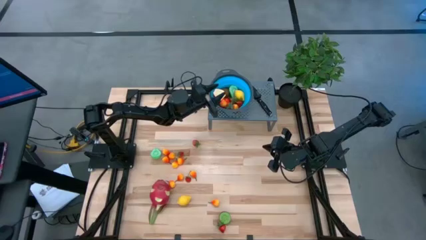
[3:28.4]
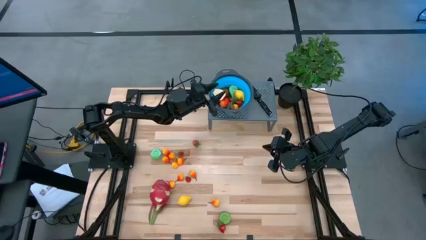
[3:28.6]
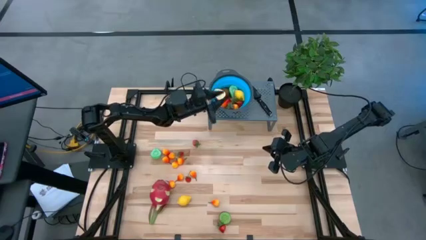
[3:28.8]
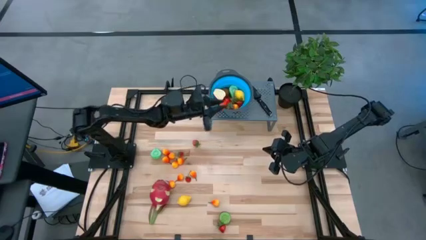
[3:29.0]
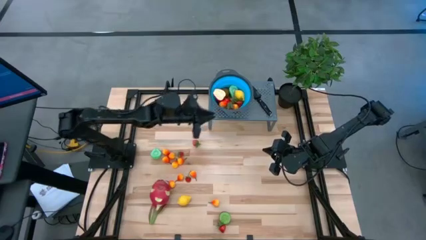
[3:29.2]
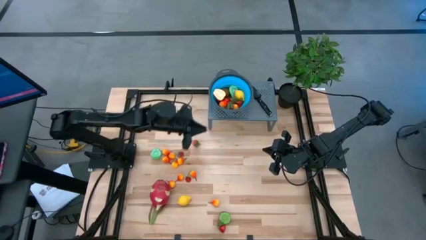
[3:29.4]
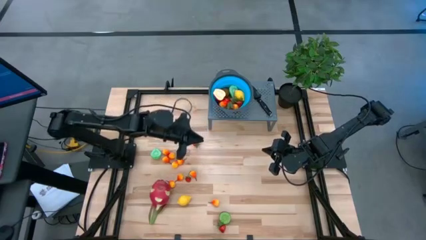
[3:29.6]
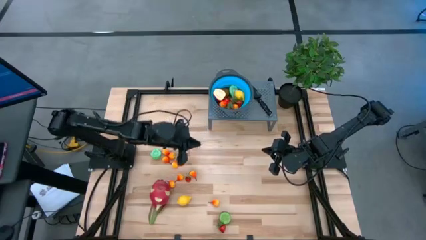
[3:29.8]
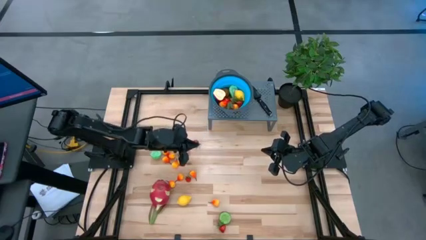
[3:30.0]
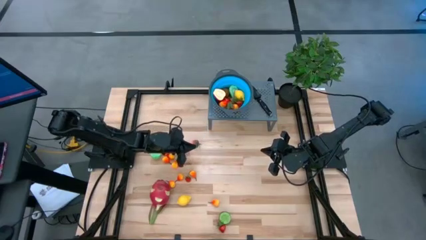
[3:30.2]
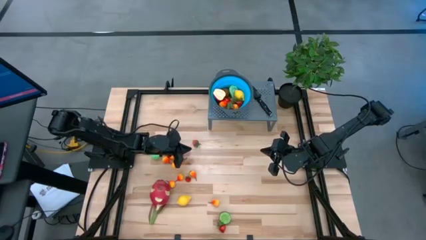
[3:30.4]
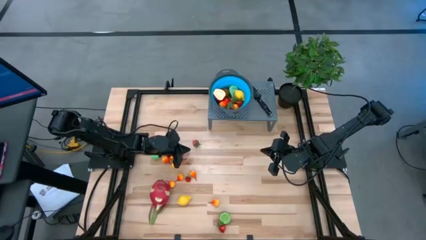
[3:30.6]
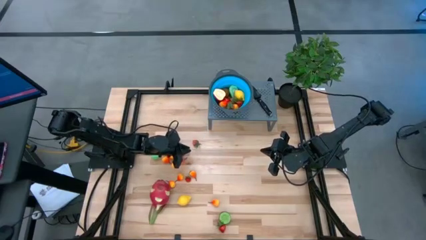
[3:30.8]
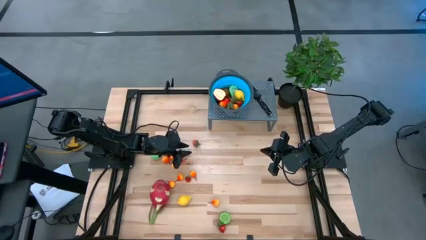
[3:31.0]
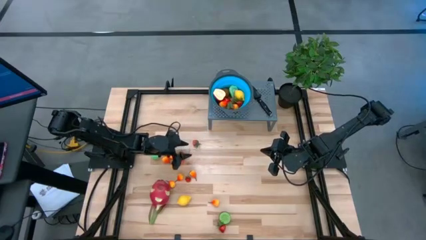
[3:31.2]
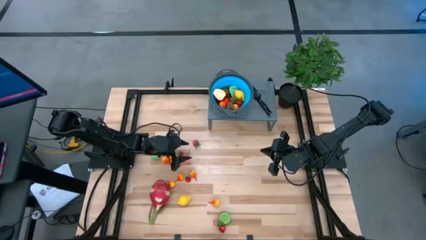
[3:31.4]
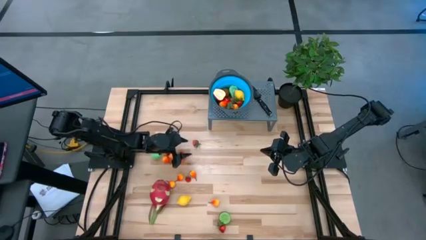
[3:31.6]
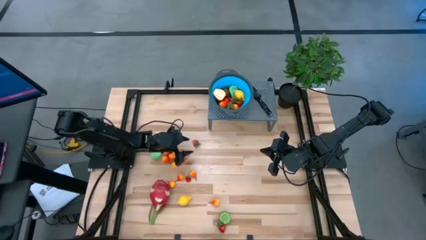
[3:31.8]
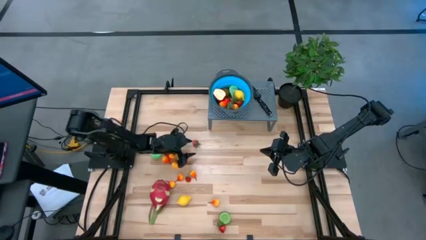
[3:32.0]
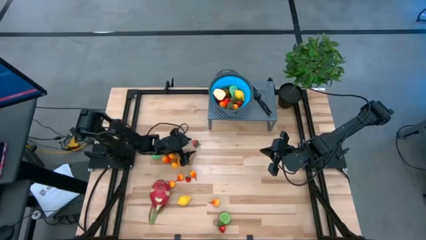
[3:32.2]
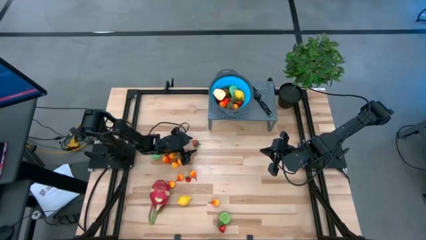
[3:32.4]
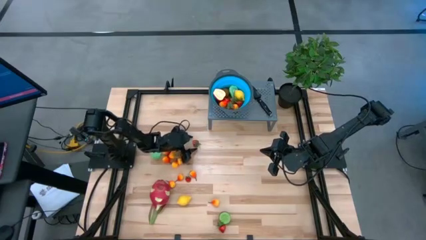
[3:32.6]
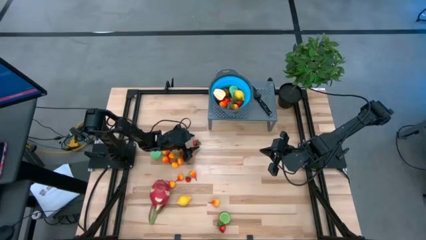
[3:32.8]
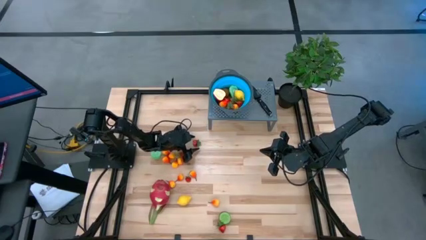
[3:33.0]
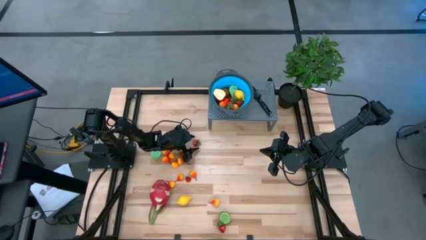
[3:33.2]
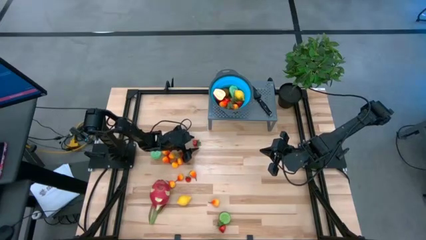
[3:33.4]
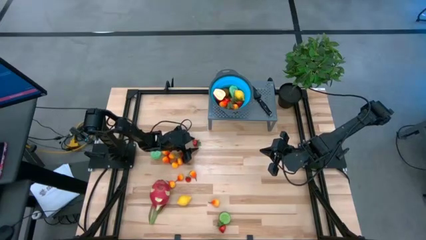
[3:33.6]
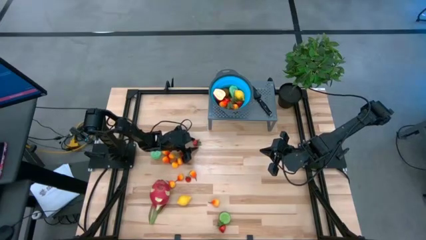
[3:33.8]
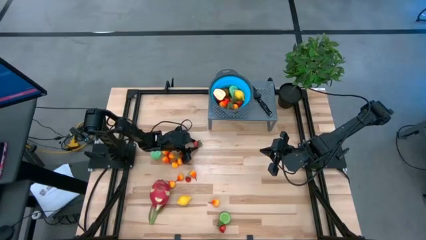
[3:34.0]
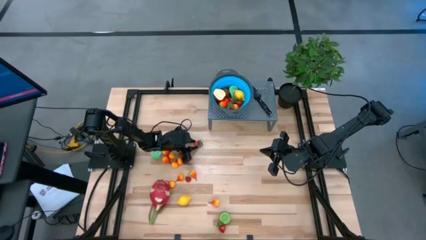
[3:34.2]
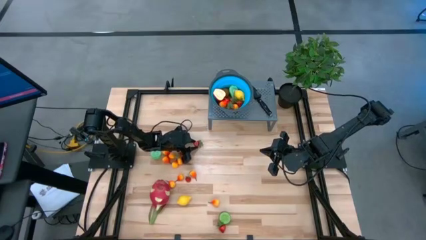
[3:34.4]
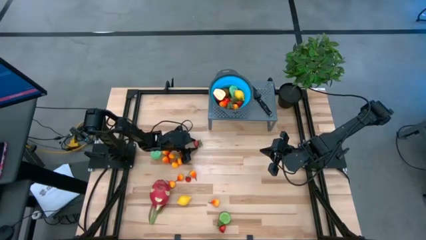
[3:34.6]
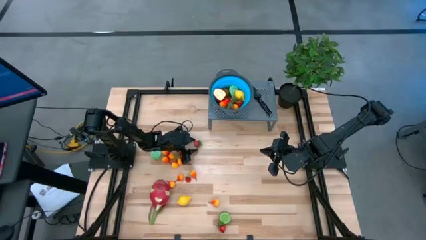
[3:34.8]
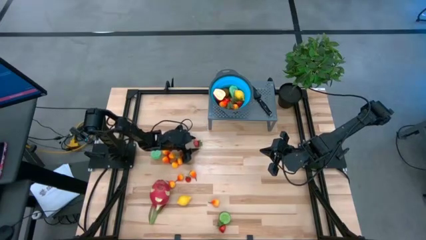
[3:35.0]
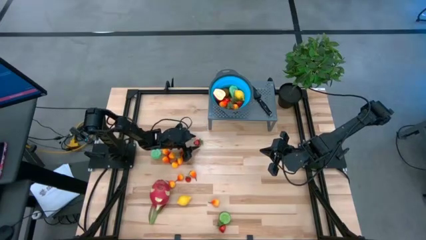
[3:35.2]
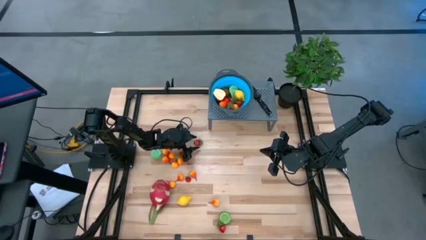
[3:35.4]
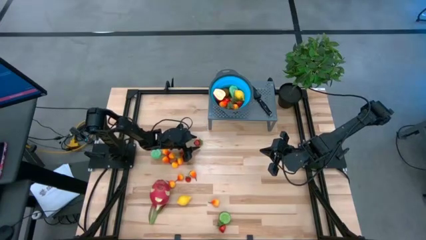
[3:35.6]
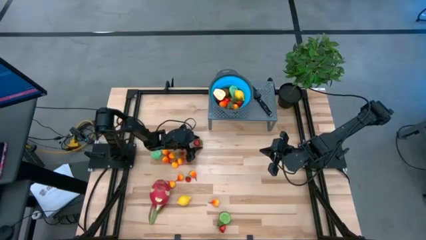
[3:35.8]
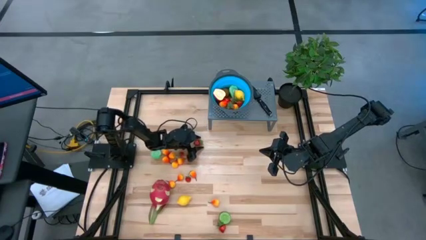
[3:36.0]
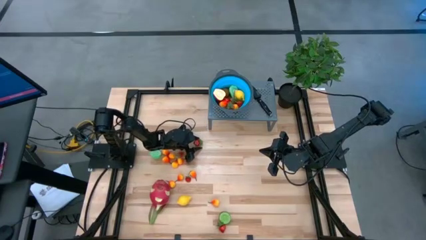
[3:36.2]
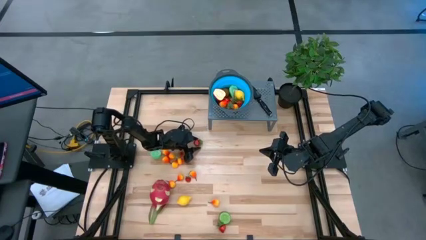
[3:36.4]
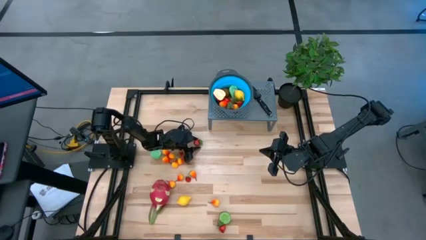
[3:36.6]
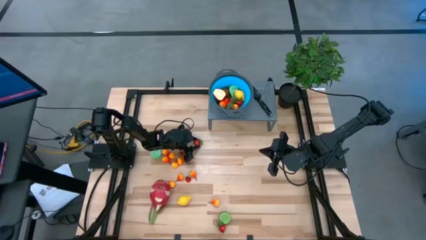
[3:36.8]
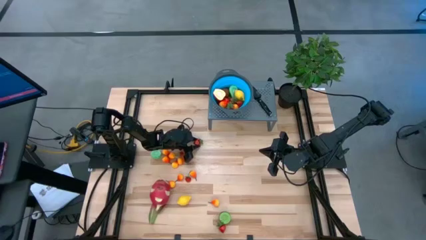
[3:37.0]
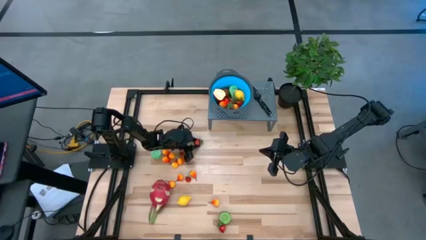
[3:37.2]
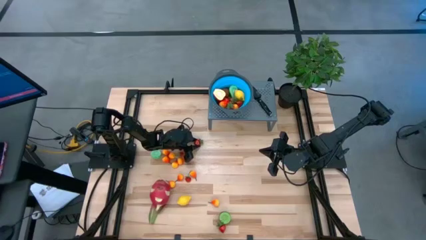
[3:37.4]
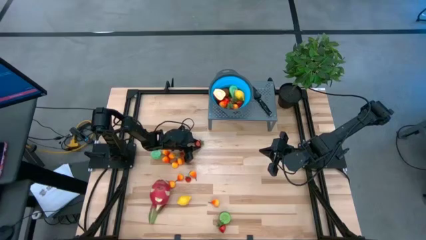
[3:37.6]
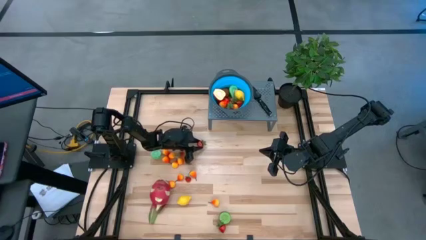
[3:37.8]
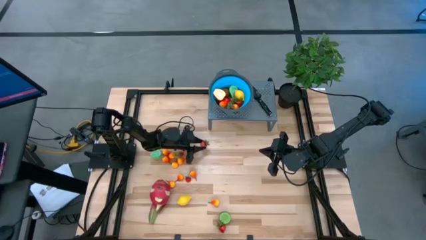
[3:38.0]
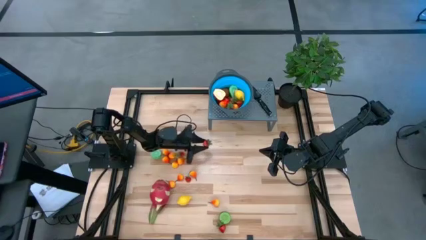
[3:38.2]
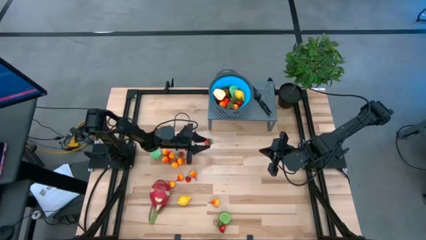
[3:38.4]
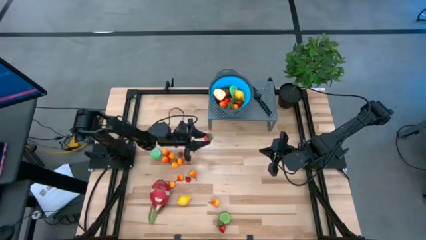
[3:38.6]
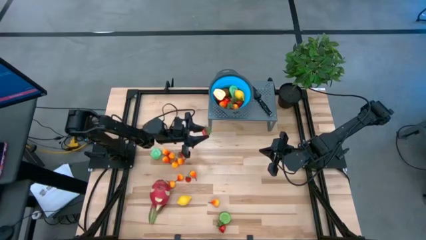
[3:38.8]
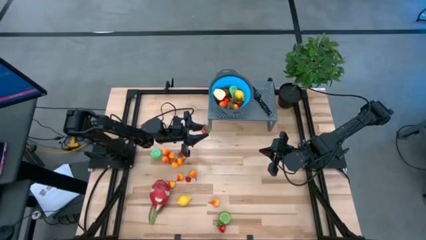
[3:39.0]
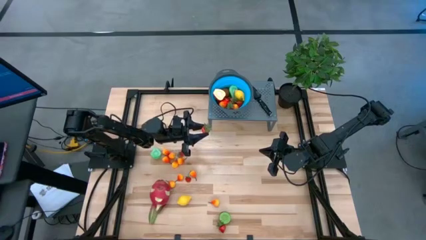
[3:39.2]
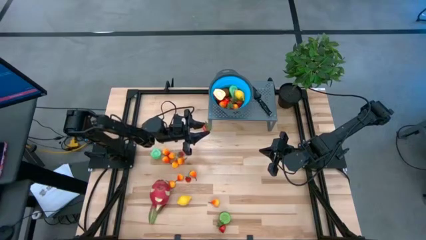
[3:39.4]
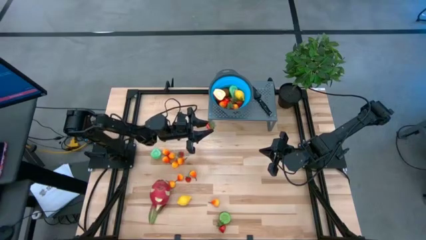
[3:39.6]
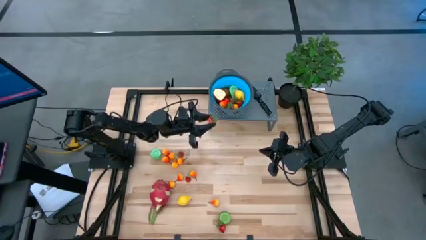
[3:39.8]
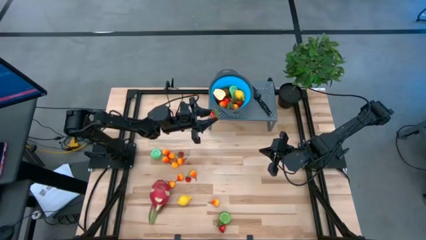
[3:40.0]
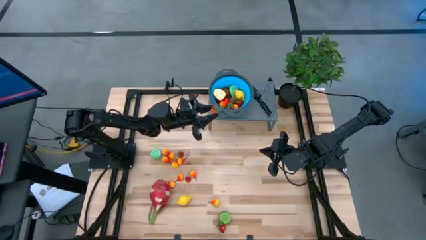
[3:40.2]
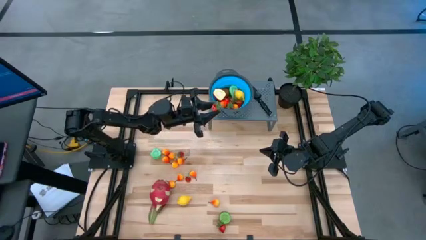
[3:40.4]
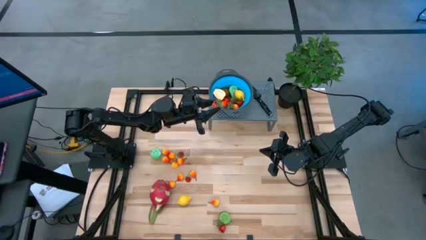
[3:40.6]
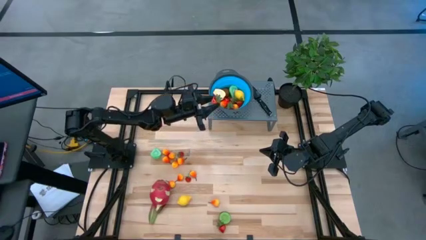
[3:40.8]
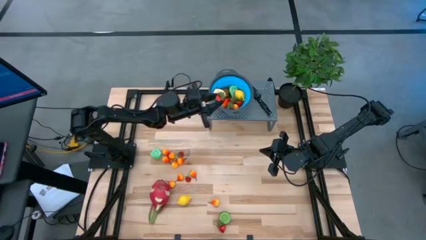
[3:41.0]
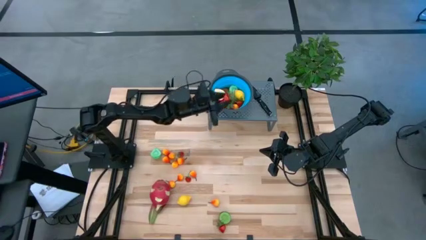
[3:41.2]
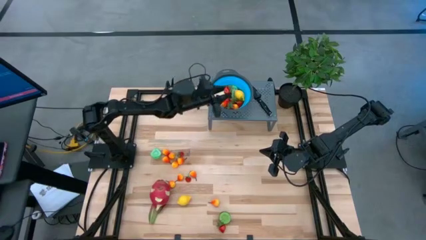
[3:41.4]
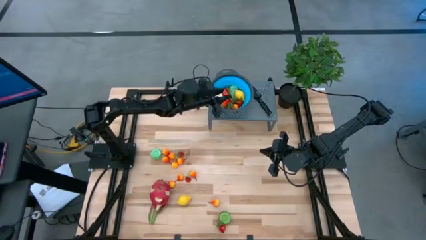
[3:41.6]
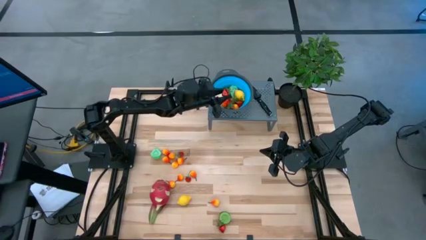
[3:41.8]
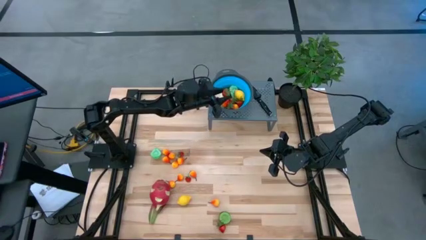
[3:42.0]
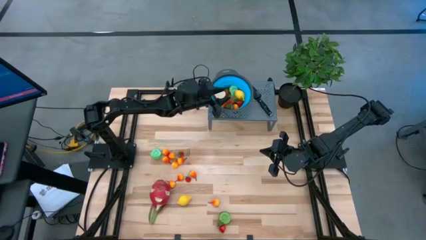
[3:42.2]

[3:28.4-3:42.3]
Task: Pick & Place Fruit
Put the strawberry into the strainer bowl

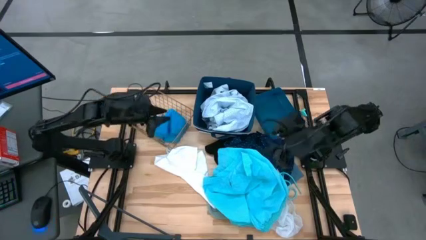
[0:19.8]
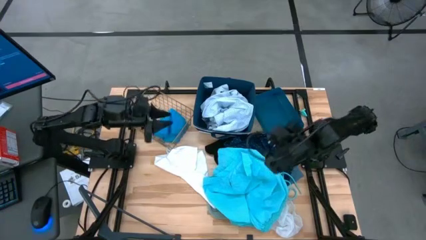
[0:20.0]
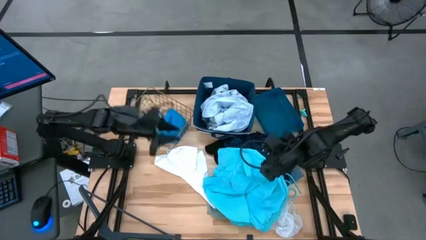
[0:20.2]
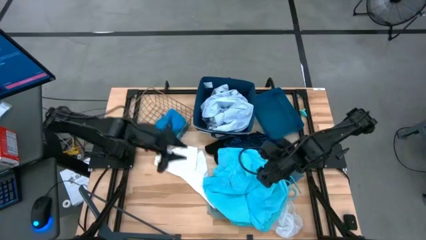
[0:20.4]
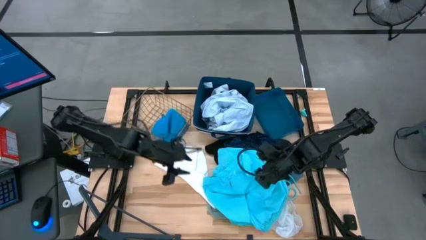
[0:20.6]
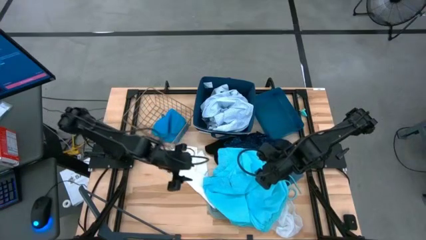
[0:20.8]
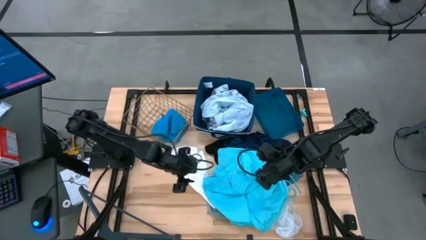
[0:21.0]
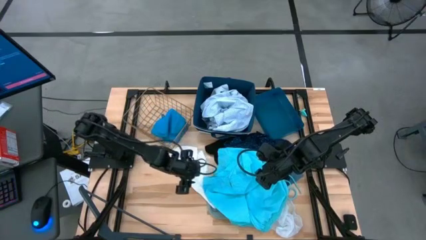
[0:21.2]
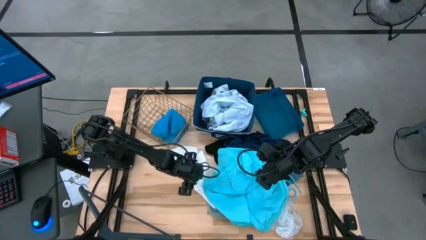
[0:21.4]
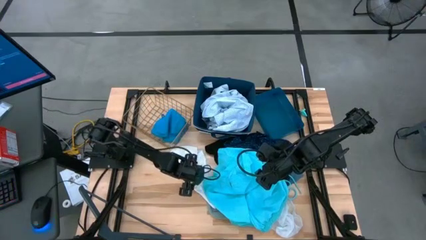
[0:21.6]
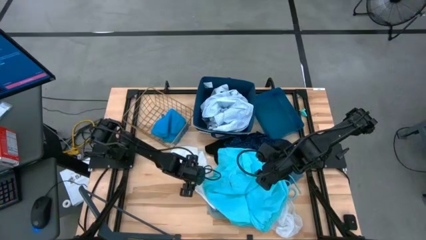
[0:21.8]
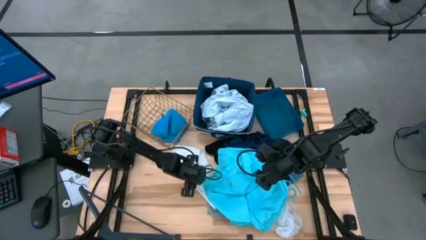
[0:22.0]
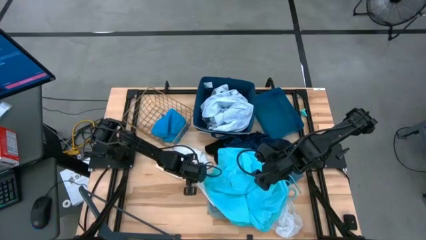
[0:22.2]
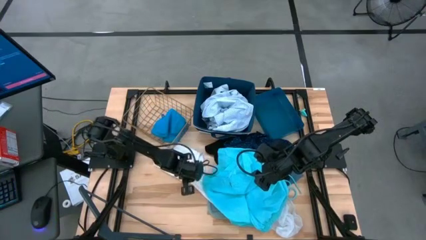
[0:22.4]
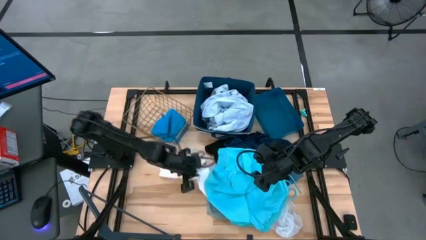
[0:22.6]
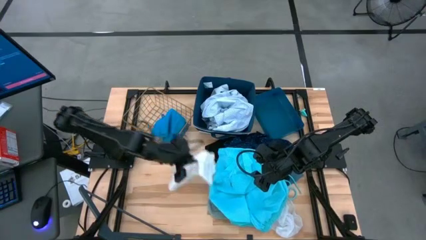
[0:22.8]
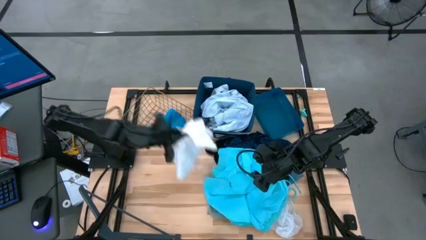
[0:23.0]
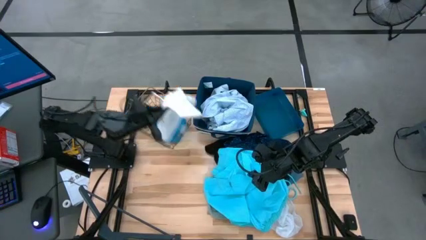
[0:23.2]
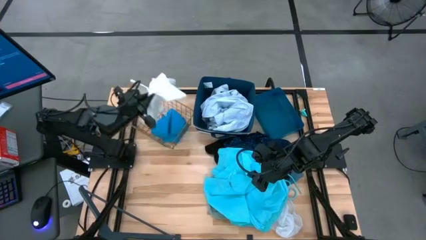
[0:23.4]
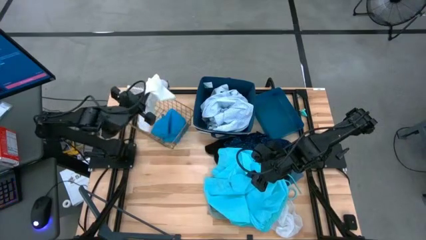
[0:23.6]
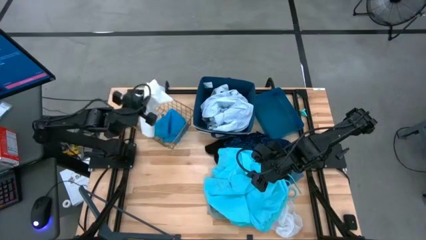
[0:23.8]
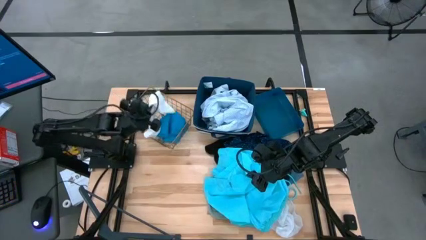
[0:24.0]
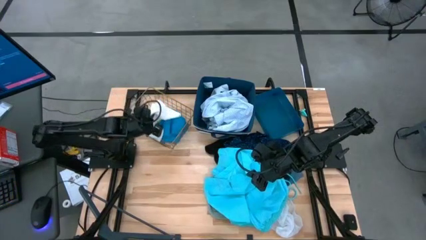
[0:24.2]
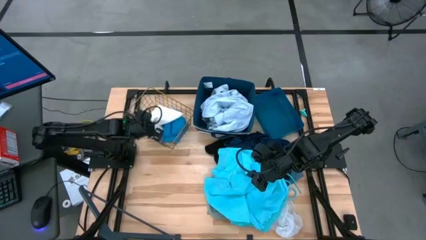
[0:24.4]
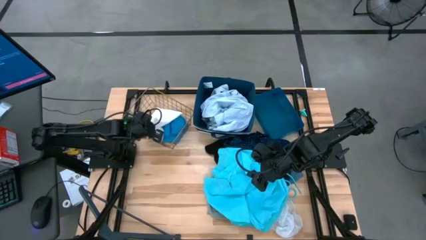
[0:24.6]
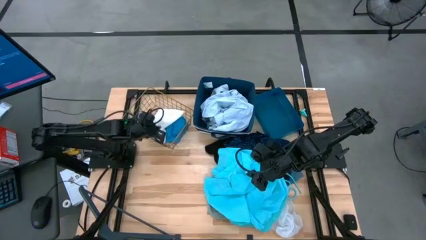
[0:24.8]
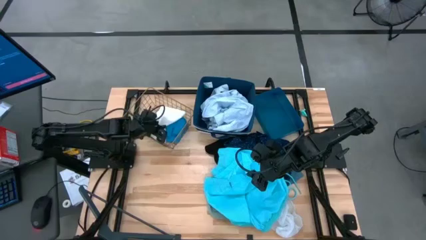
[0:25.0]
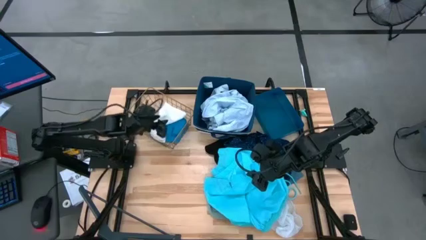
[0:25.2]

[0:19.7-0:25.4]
Task: Pick & Place Cloths
Put the white boxers into the gold wire basket
